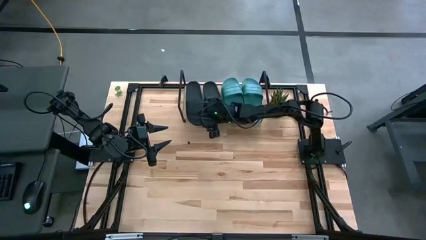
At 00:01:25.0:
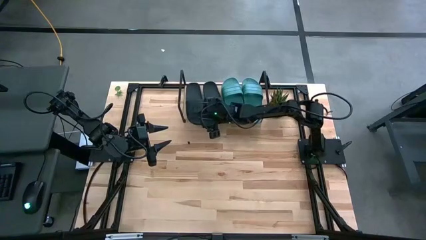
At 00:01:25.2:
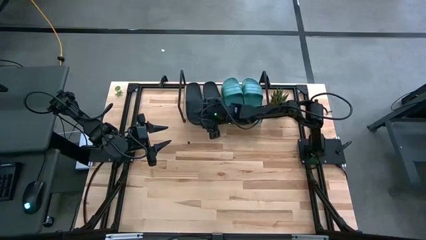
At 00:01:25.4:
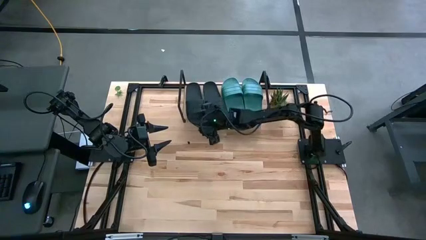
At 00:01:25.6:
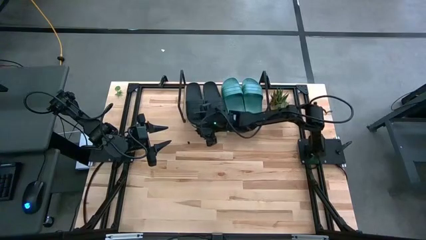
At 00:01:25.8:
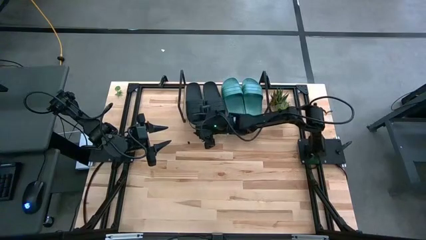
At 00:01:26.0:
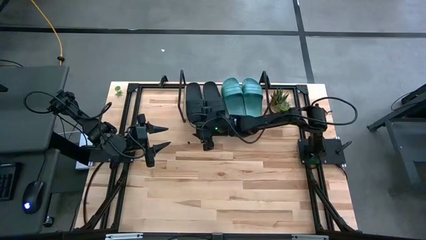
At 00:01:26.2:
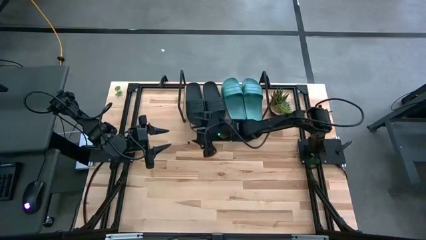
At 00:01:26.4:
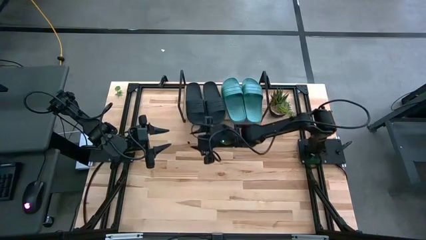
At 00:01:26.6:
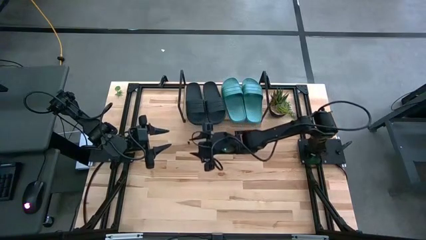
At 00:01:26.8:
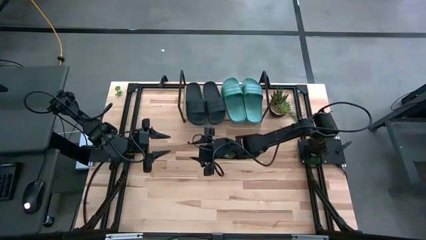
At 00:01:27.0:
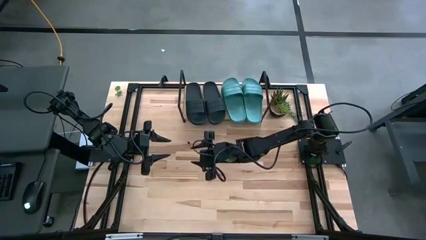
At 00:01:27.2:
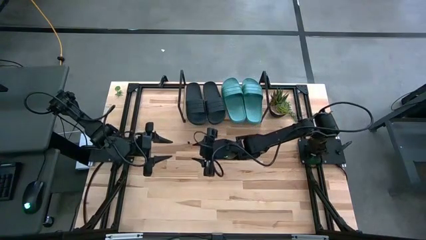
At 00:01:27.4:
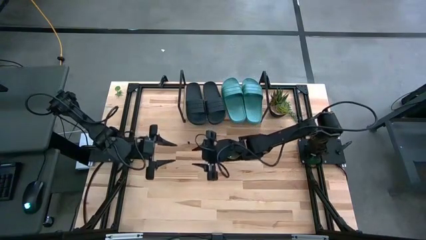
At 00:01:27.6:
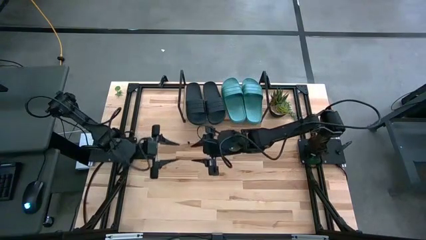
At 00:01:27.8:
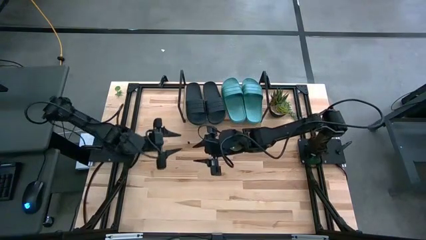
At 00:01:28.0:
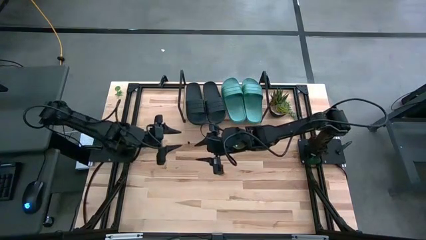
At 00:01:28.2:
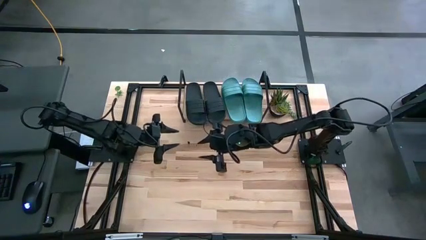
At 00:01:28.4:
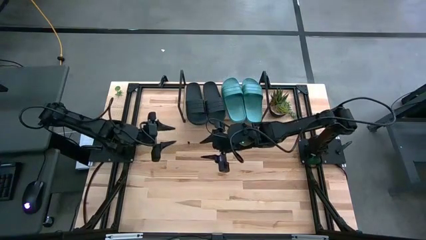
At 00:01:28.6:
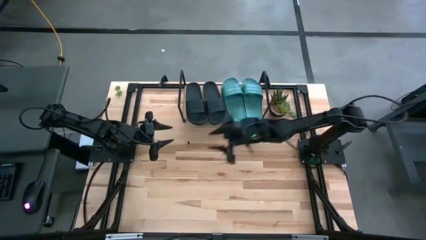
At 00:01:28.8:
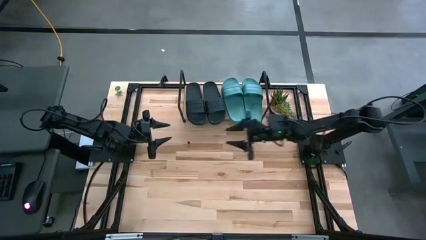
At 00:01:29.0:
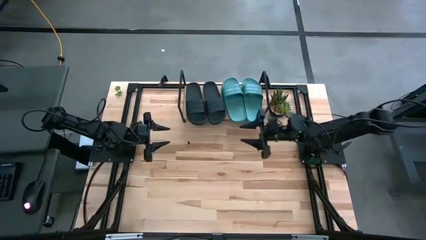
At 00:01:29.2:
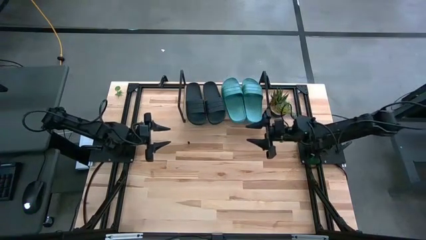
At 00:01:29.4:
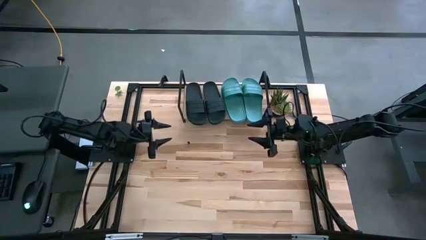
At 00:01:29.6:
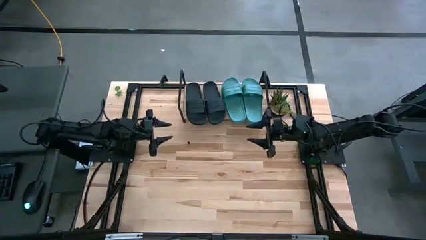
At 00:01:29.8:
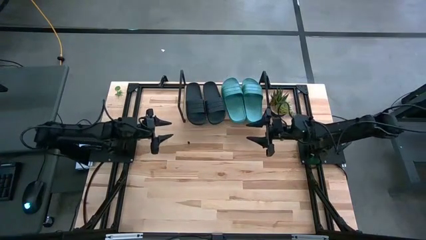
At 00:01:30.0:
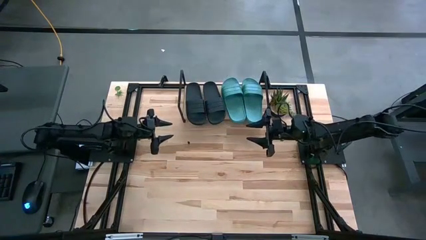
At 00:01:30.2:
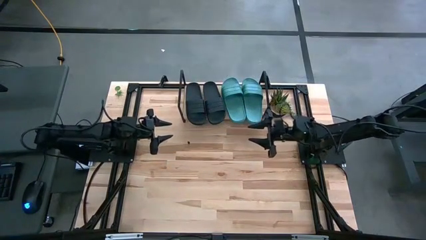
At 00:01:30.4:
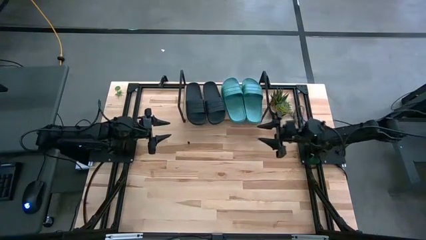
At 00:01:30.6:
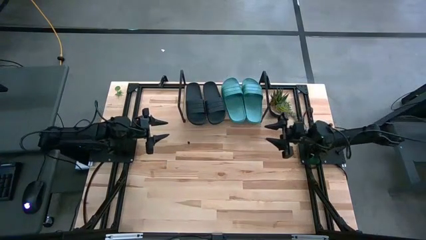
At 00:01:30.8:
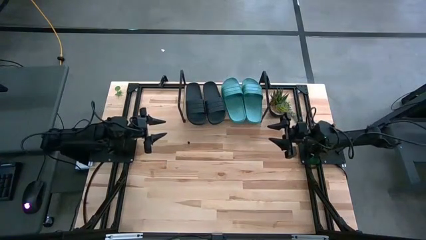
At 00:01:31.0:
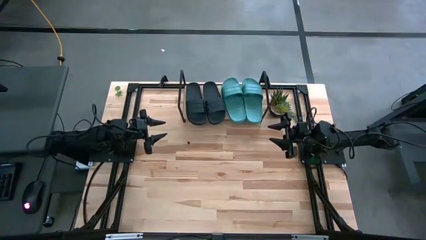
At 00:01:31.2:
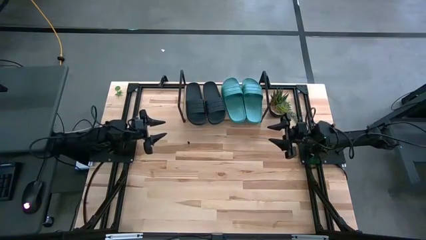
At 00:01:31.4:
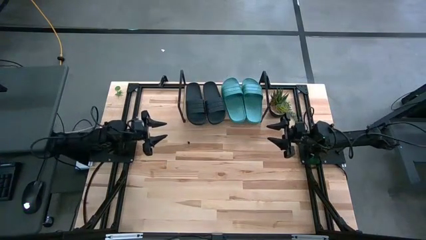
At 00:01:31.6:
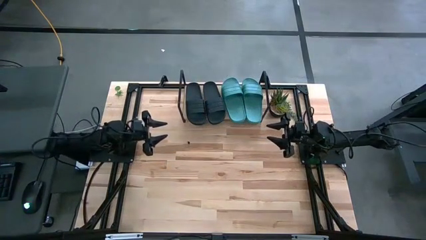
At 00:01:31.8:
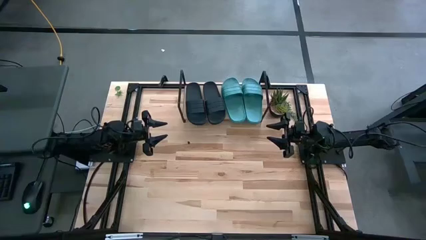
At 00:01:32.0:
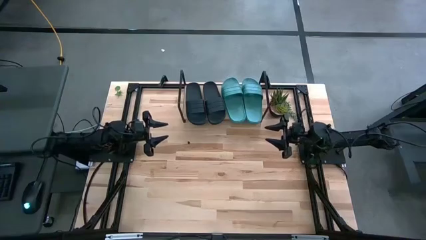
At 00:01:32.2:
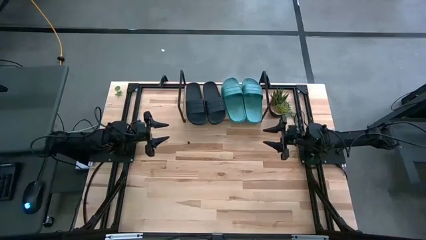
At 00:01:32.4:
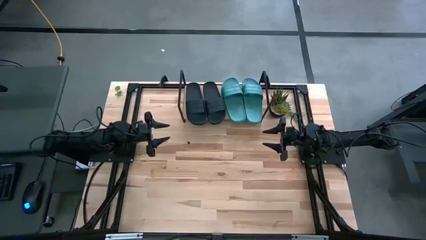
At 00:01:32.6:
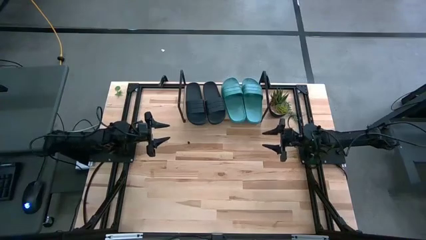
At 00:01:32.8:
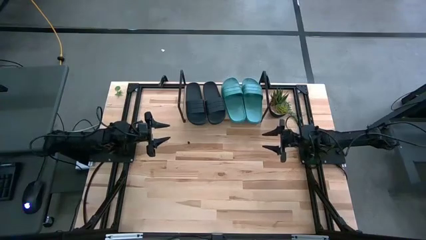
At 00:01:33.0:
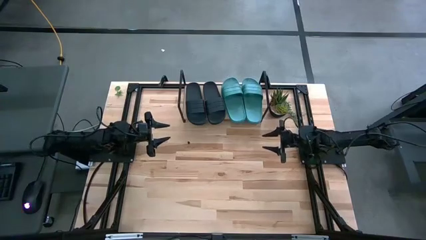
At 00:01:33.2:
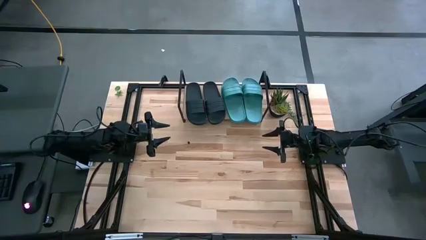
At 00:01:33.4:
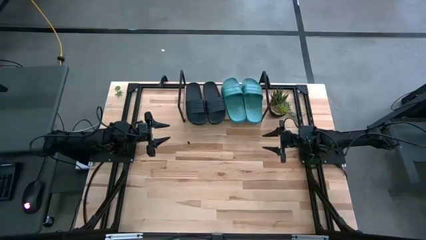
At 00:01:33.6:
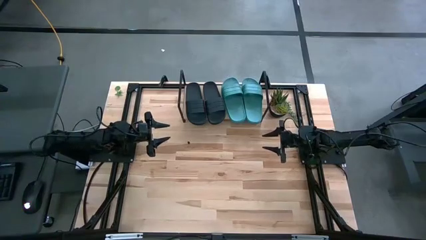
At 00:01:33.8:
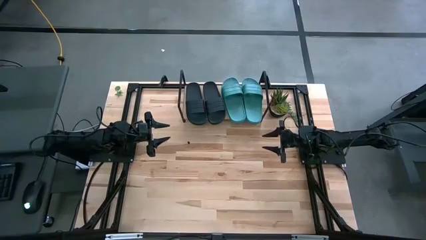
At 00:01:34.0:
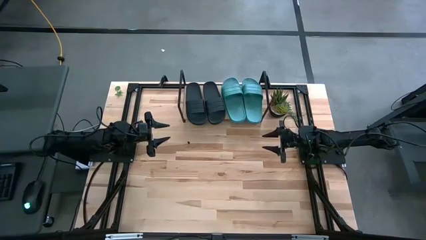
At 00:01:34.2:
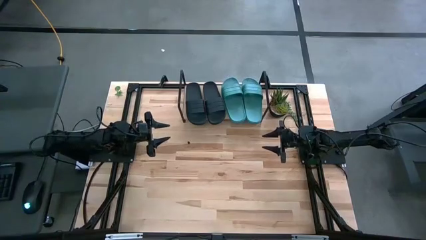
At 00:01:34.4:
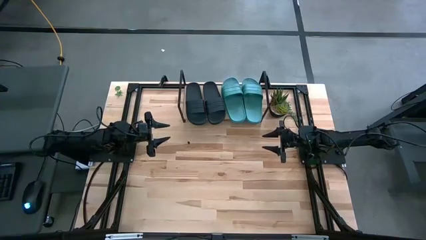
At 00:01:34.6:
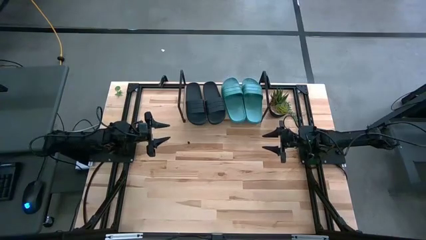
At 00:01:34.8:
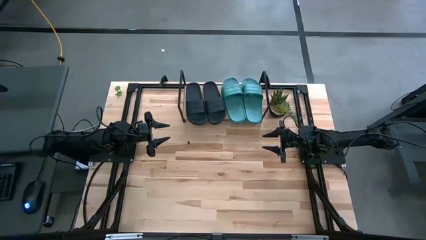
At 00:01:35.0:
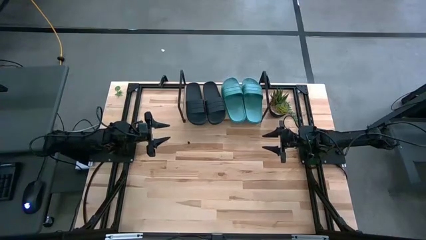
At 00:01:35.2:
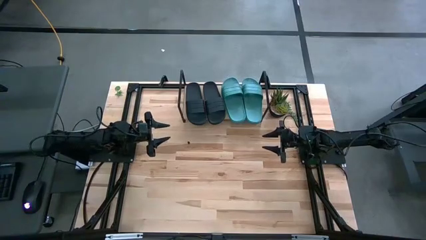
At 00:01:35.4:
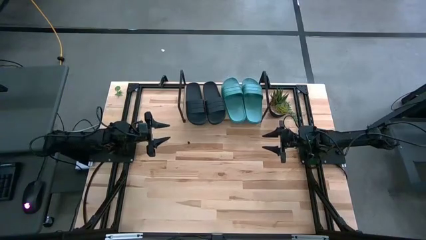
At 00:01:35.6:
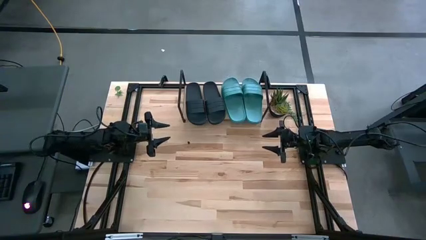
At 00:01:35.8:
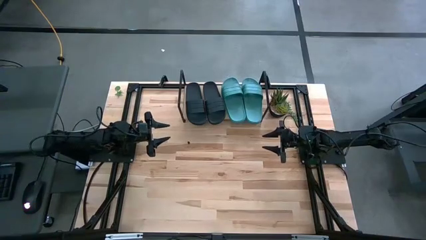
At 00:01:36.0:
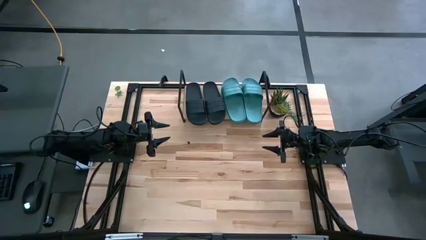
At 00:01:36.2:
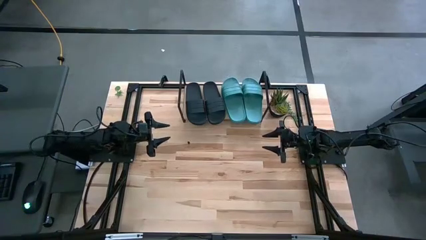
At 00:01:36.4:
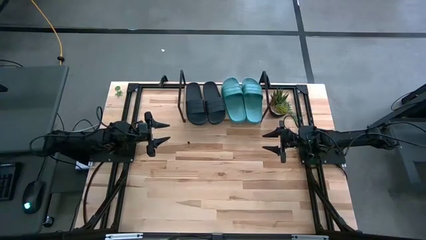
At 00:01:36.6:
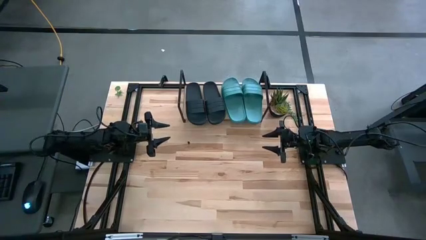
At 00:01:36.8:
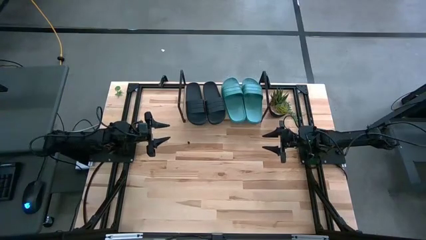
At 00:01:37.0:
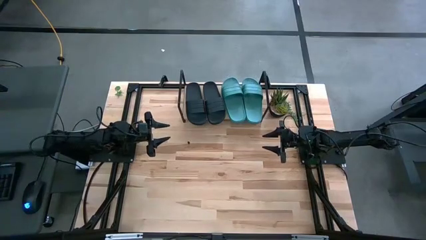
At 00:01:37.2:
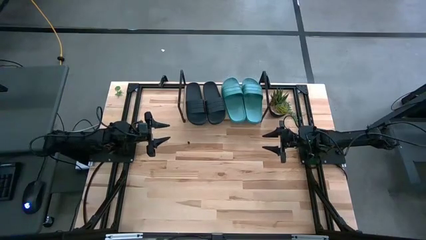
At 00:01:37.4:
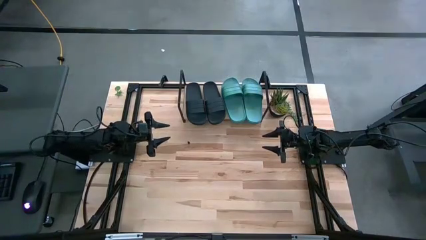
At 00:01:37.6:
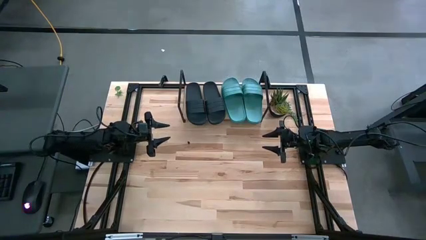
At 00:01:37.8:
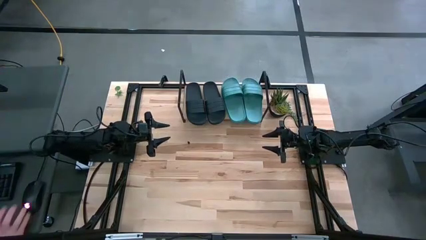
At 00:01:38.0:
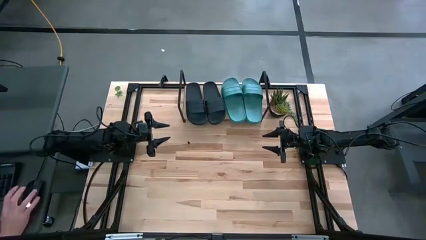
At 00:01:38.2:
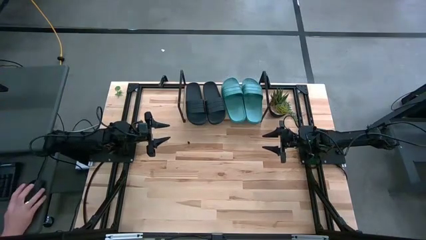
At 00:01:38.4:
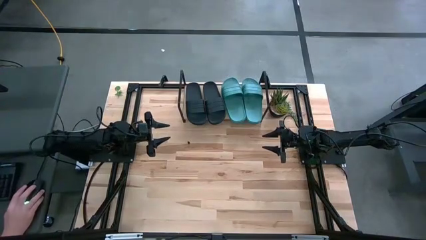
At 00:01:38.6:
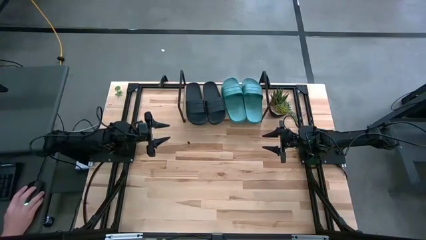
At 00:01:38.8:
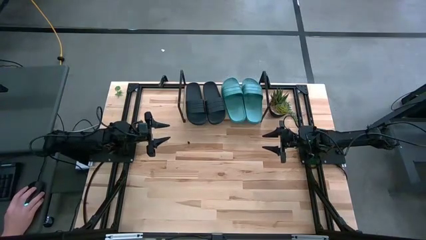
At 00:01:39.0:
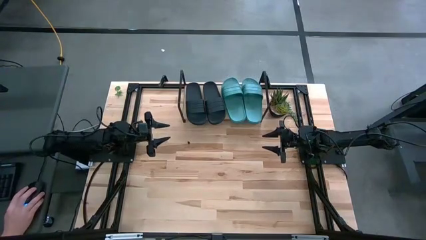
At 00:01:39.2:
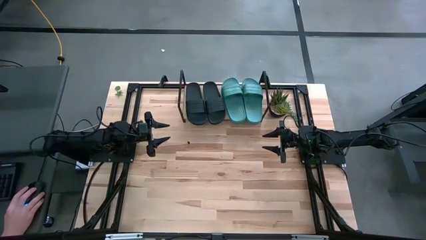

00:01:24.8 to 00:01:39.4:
Task: Pick and place slides into the shelf
Return to Home Position
